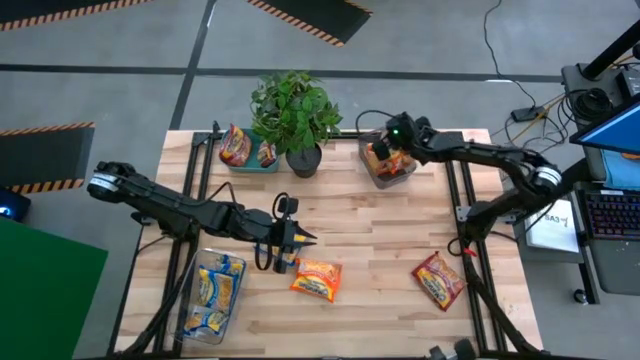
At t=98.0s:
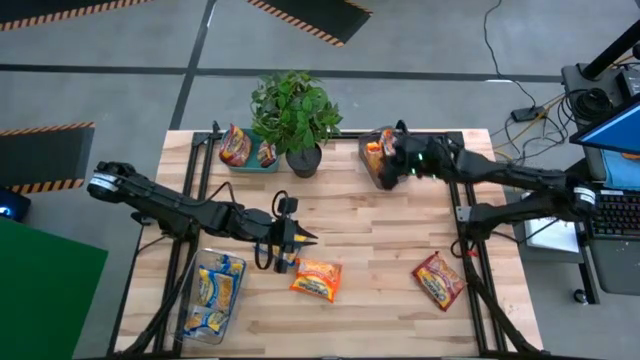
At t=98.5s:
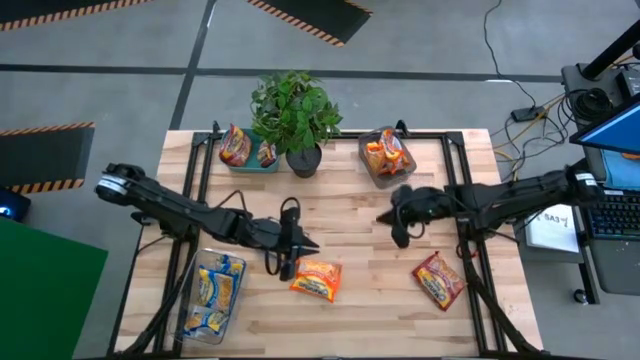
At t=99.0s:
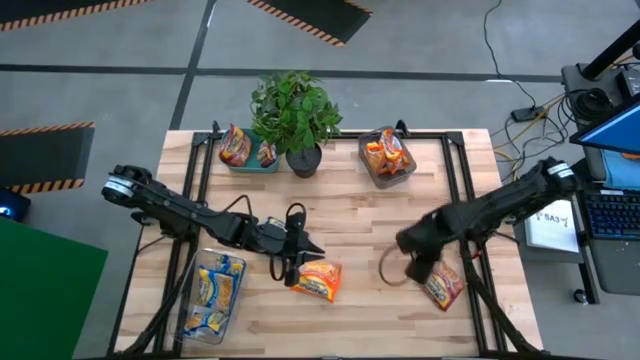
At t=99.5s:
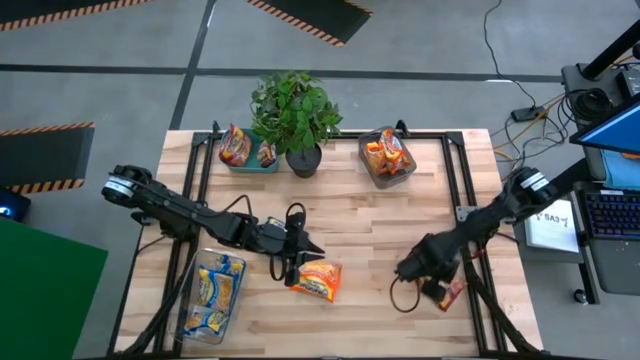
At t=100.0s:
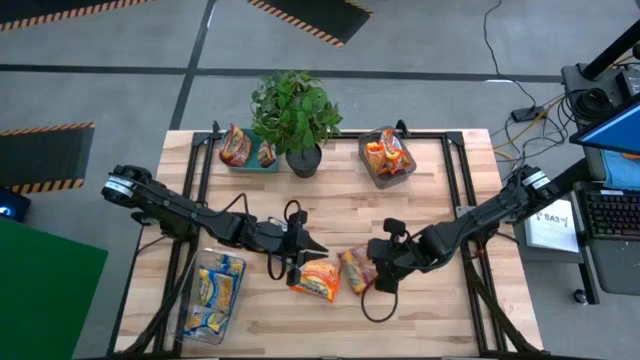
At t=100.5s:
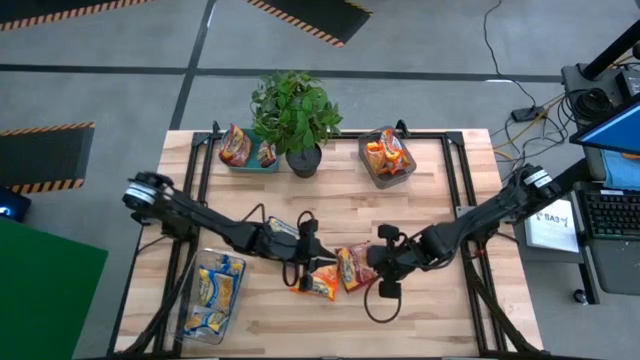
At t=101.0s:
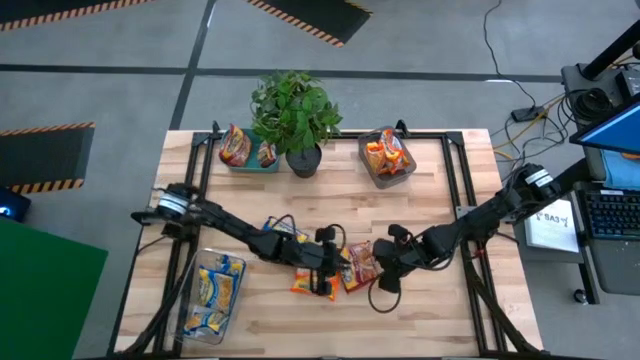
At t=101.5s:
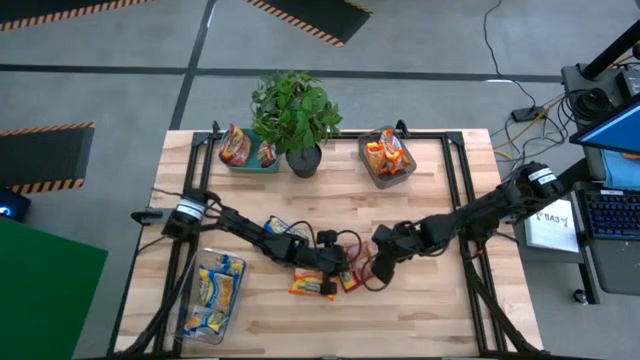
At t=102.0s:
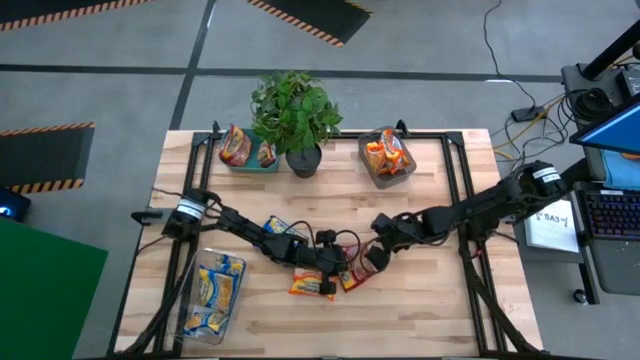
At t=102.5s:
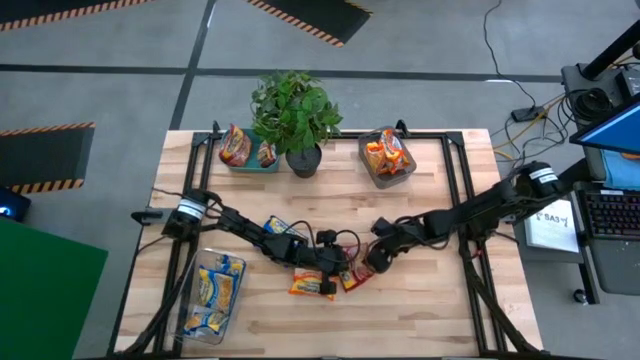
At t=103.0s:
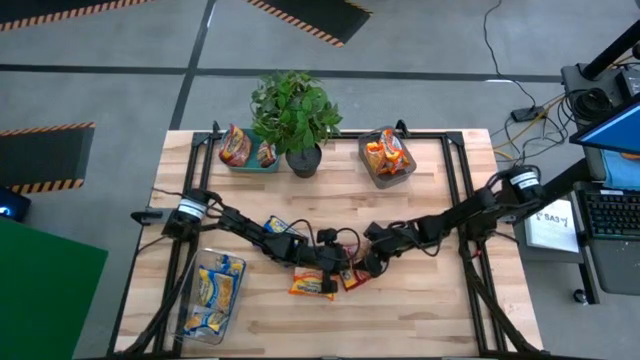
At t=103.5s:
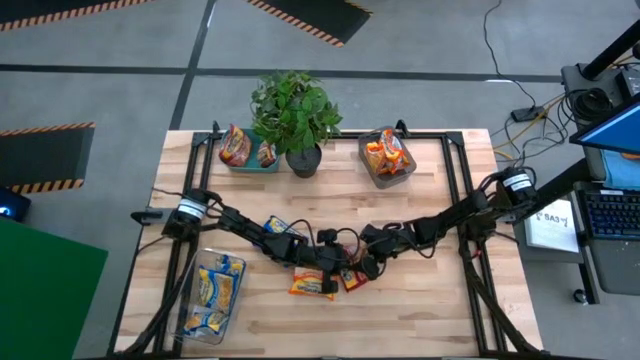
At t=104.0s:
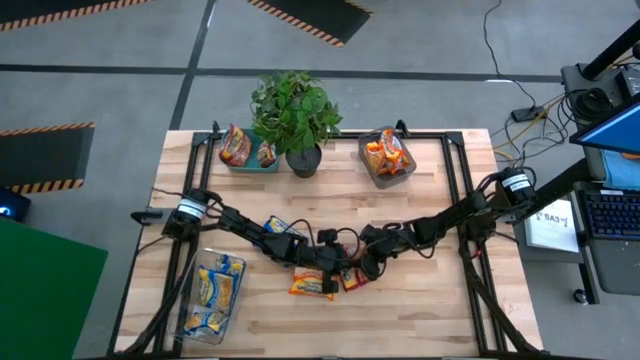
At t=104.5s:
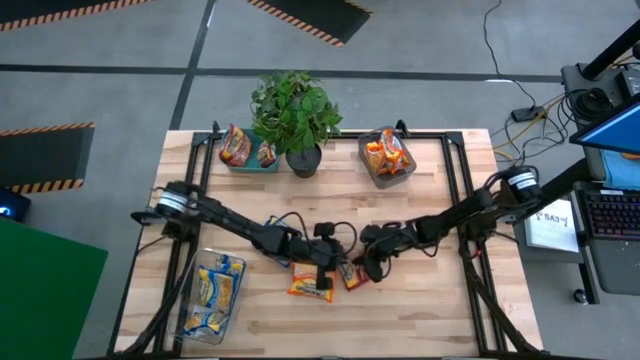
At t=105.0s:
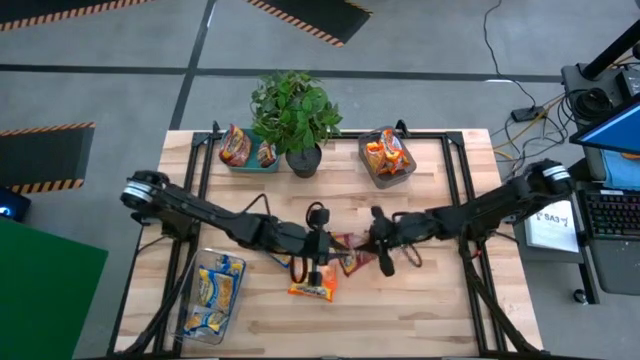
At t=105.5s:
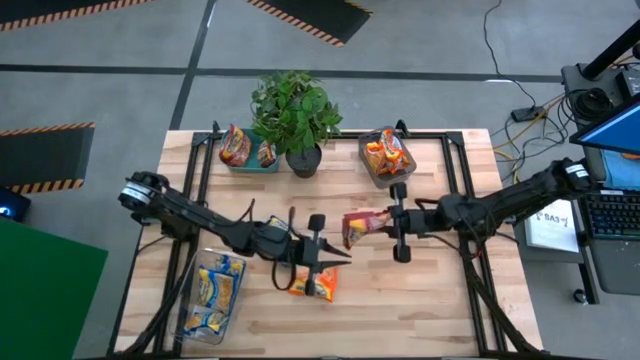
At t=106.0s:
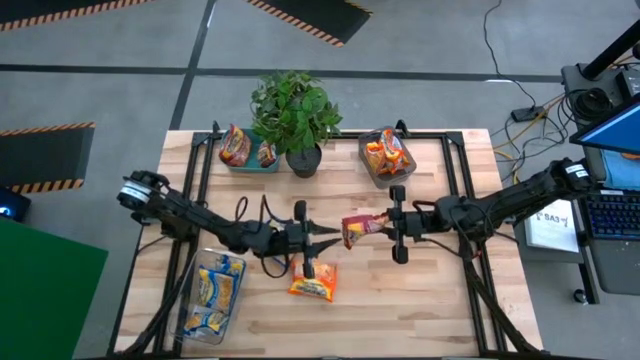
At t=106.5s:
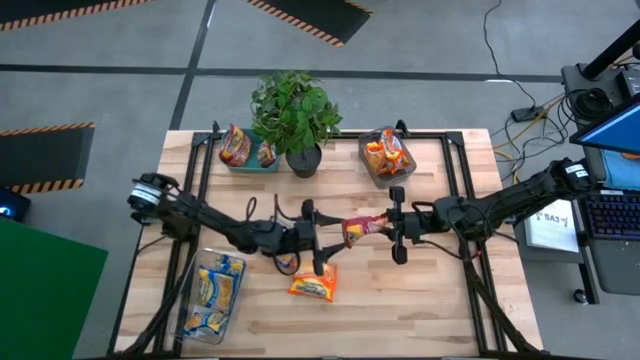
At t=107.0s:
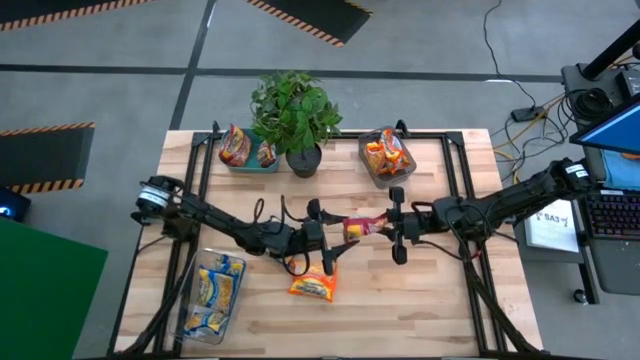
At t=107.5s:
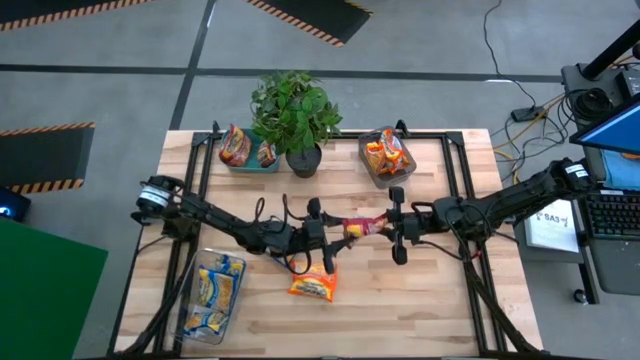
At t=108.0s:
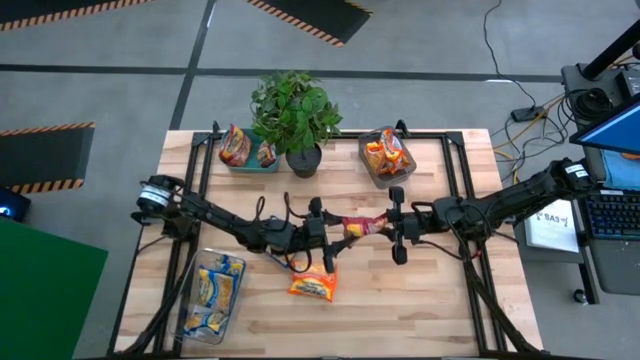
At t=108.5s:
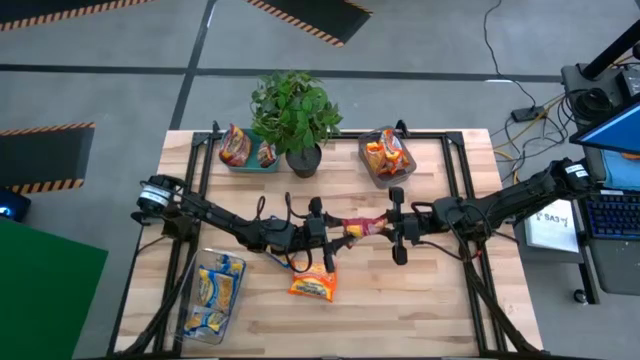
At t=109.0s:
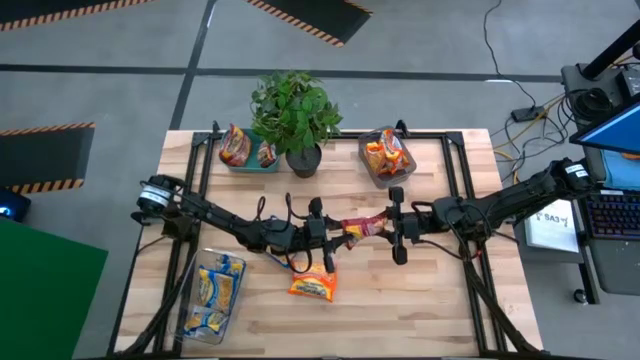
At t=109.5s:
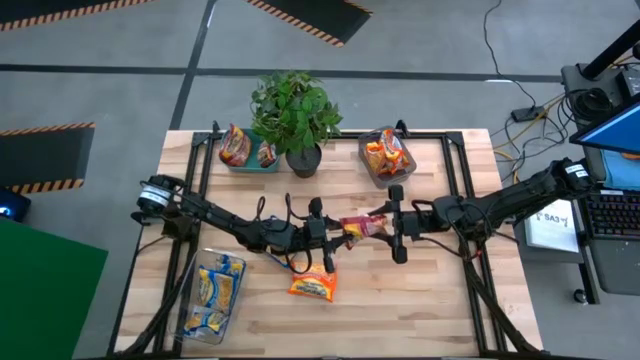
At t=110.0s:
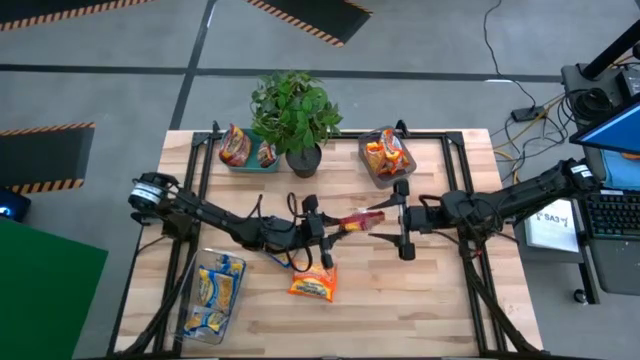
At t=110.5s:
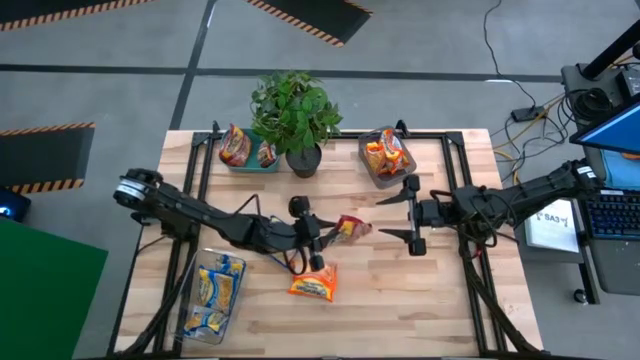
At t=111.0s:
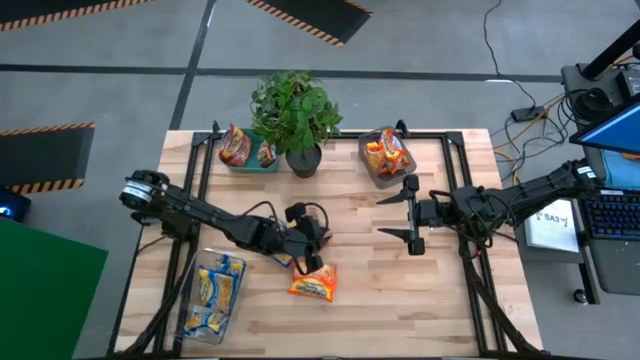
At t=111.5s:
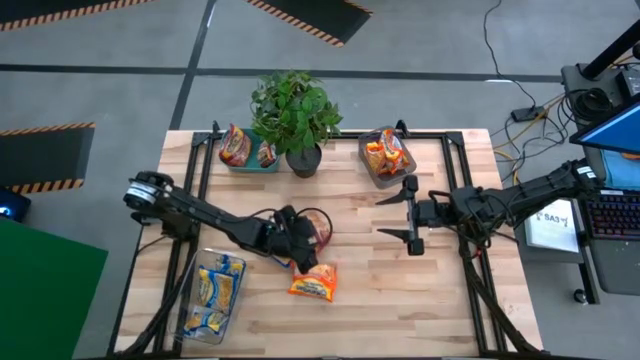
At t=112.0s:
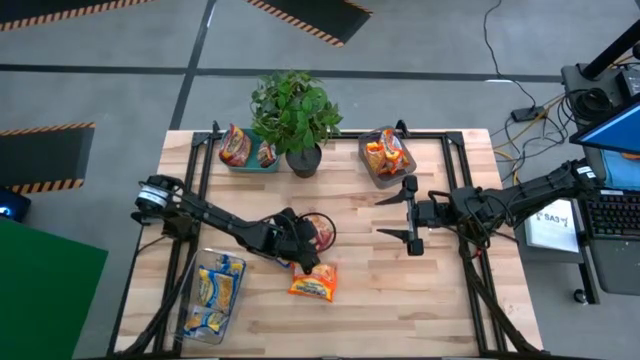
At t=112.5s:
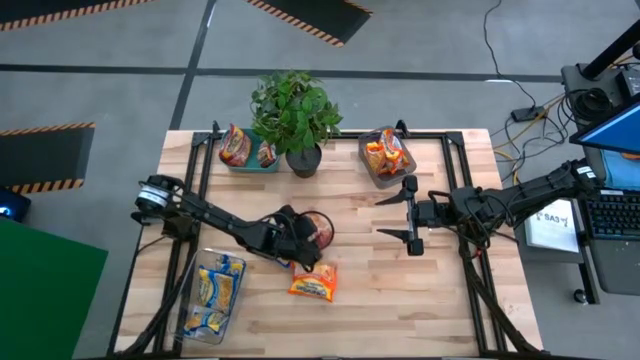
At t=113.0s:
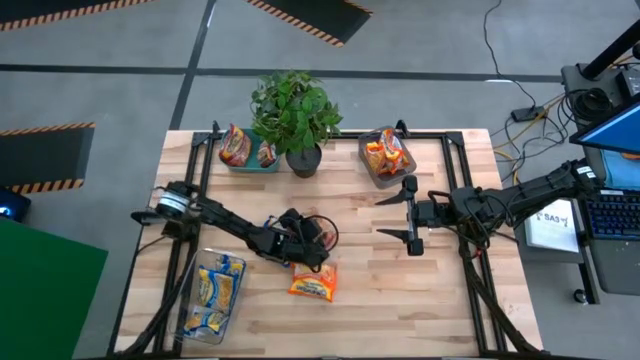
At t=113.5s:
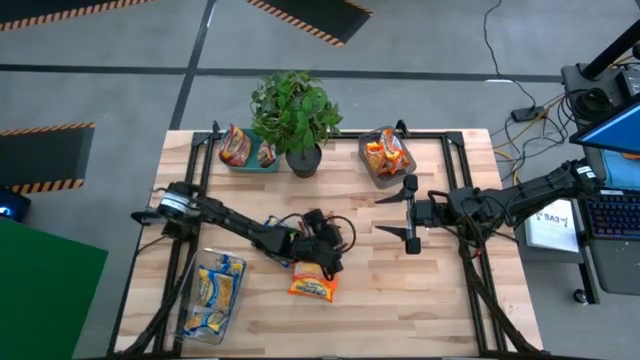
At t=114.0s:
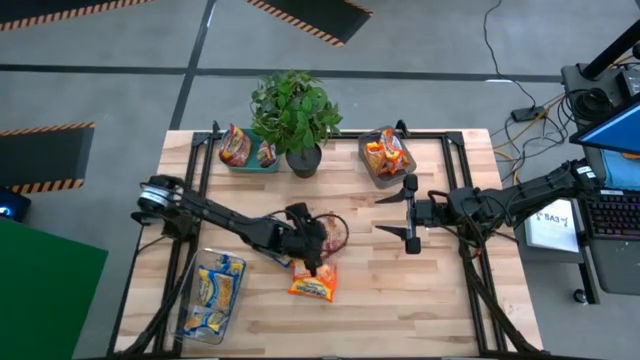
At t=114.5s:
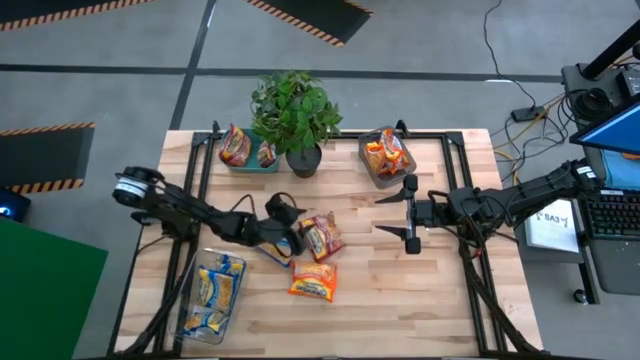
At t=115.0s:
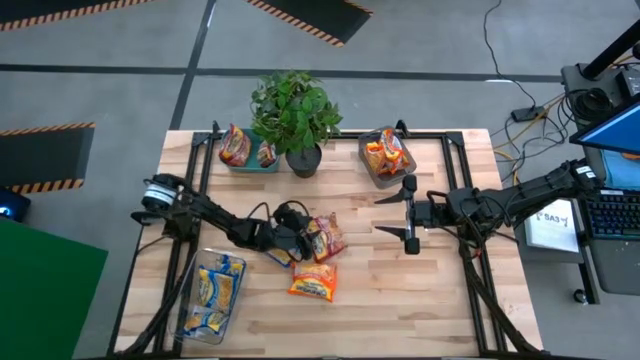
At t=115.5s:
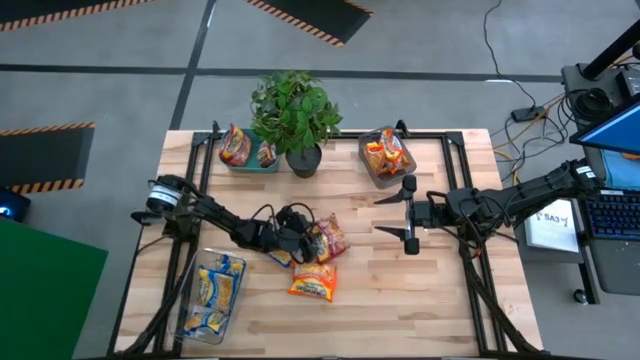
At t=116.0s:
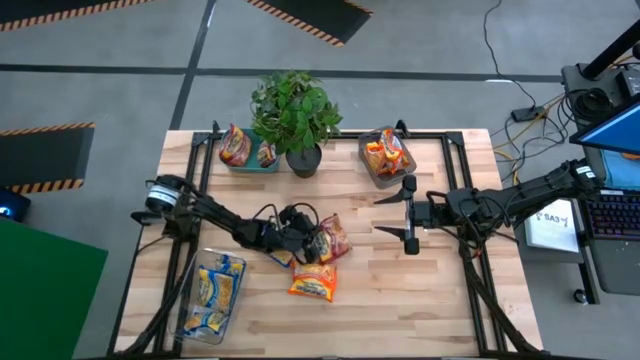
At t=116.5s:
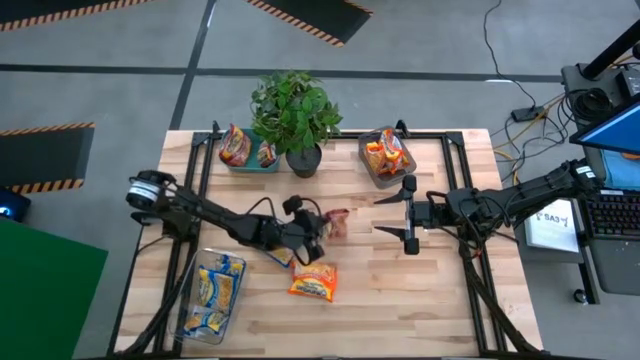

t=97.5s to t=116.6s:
Task: Sort Maruchan noodles
Put the red noodle pack into the green bin
